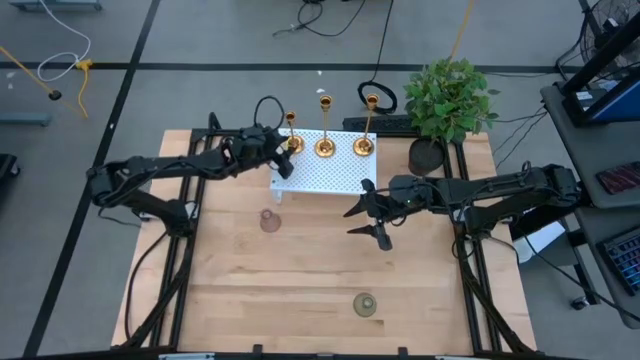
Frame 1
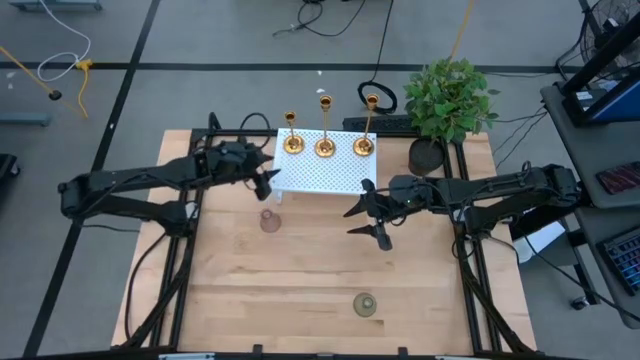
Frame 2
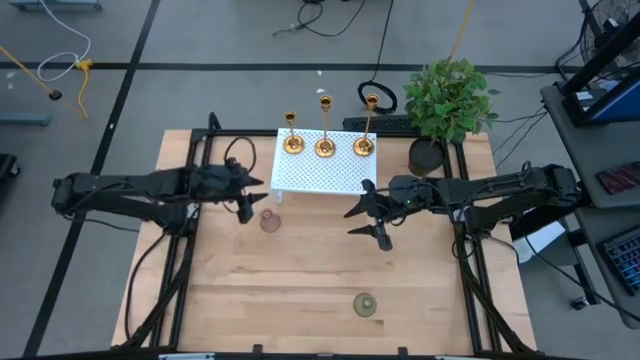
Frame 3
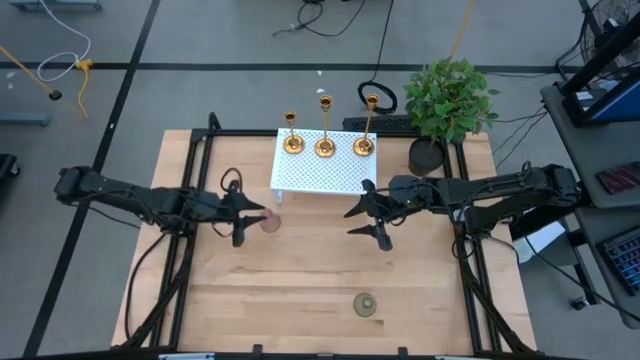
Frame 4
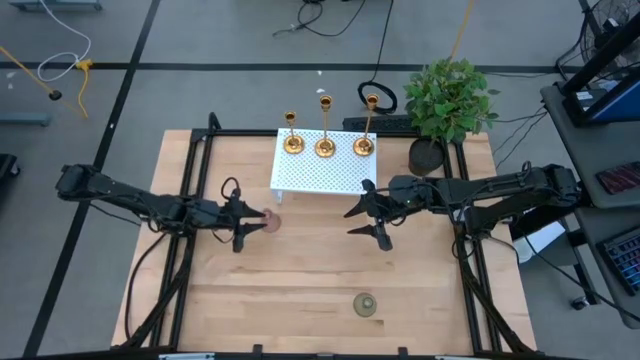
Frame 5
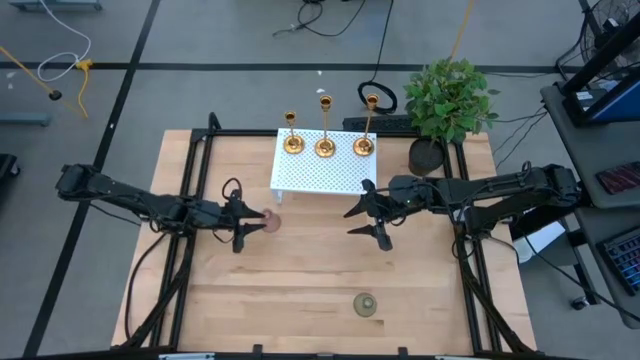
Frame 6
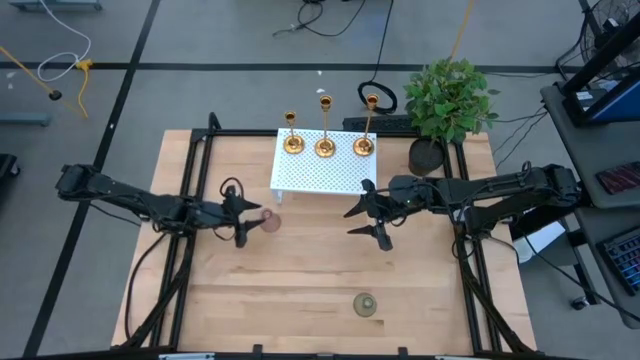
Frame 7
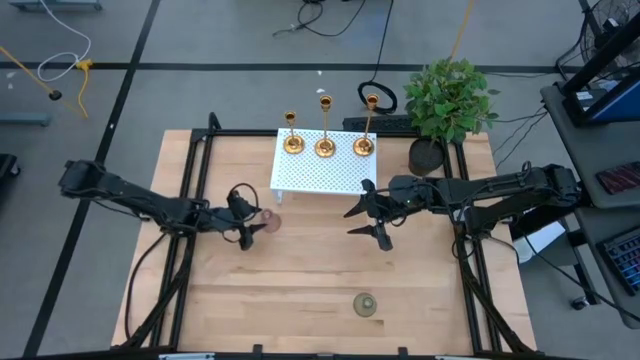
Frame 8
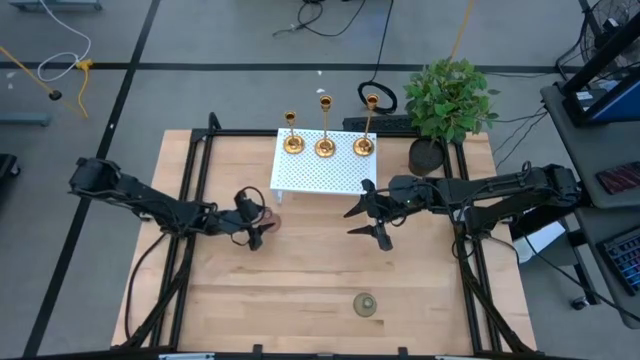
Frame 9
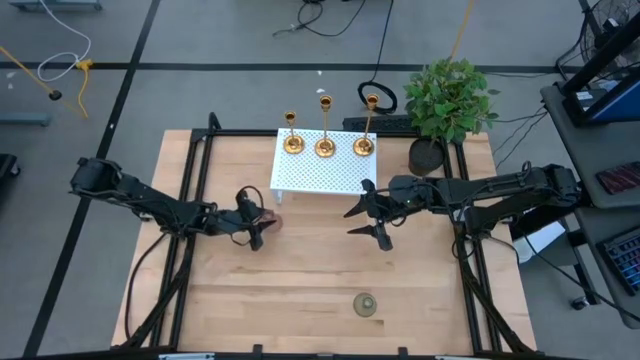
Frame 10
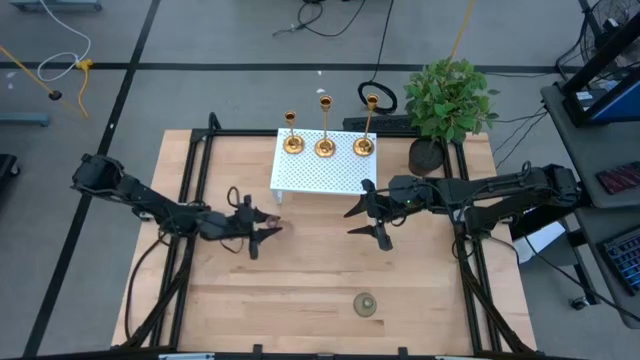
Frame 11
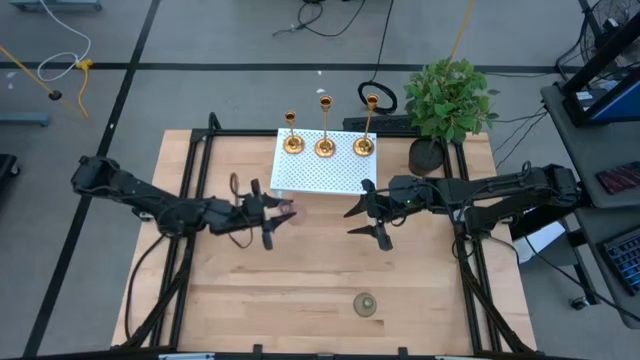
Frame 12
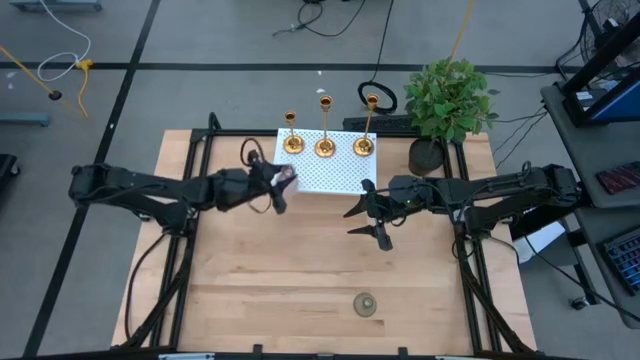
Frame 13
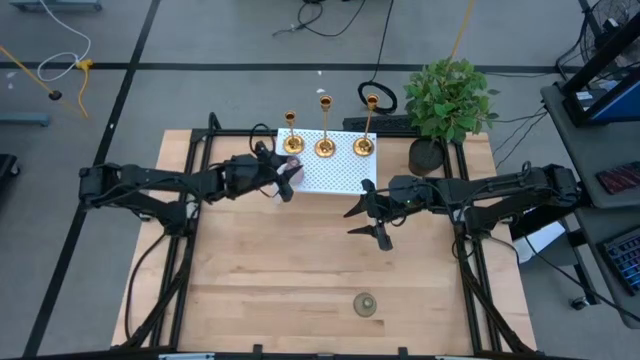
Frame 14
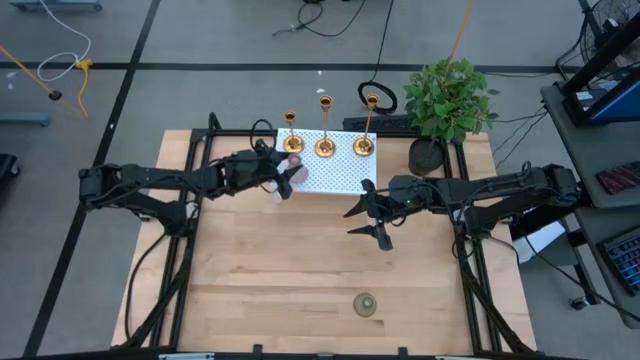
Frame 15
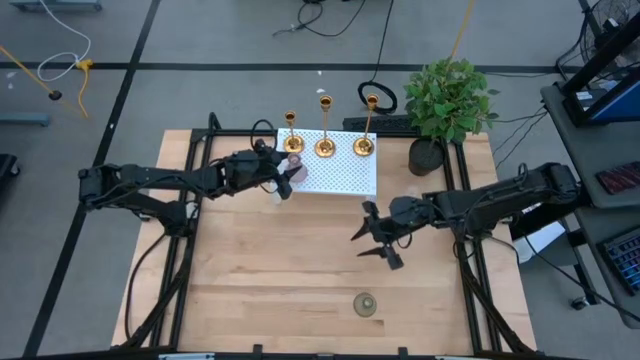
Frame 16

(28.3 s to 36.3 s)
Task: Pick & Place candle stick holders
Put the pink candle holder on the shelf

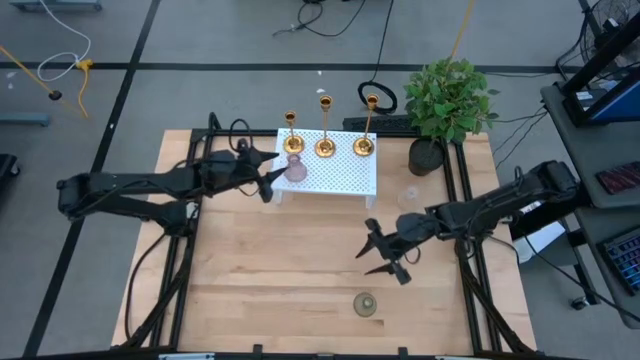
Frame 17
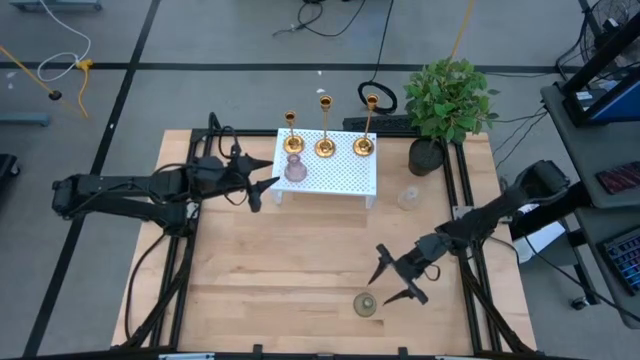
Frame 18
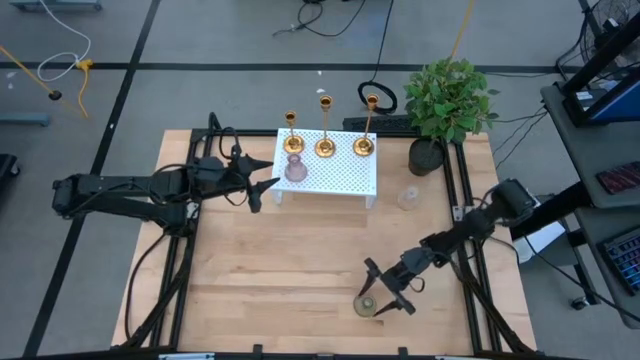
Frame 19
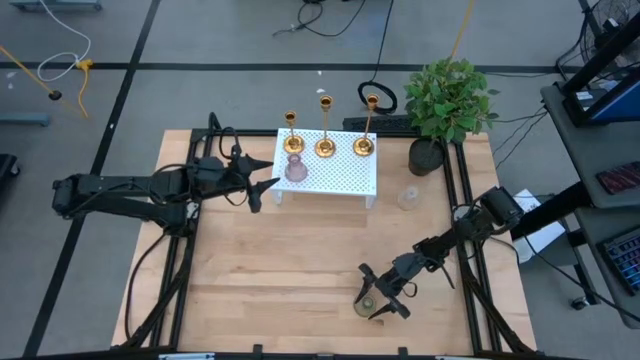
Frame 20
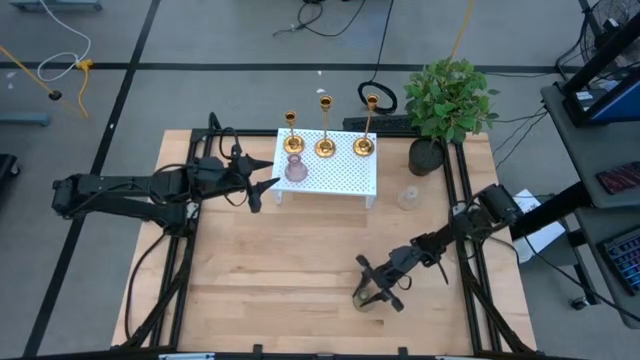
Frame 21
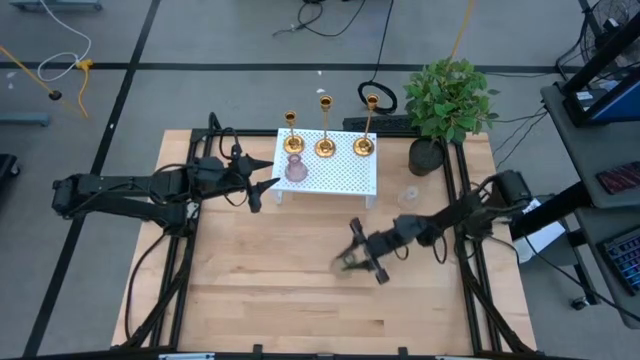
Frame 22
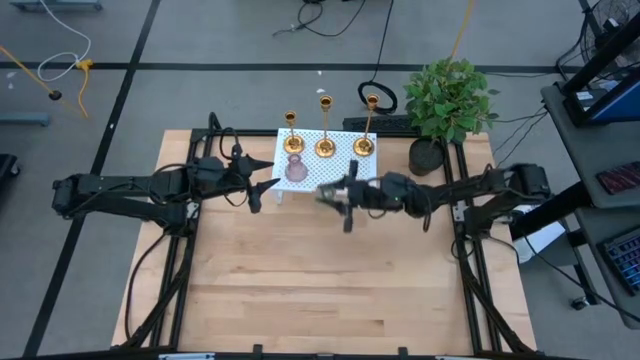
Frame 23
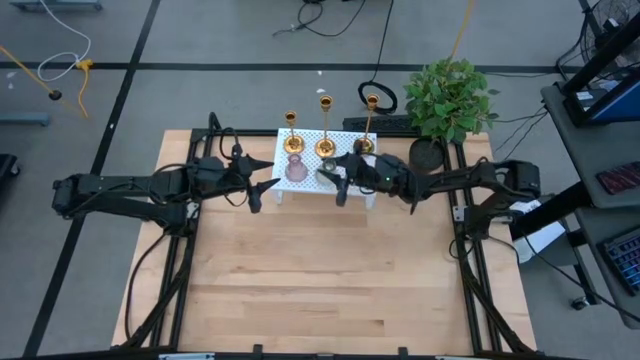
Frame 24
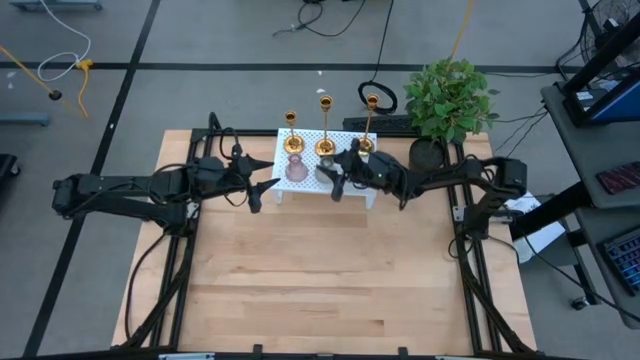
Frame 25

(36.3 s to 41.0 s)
Put the green candle holder on the shelf

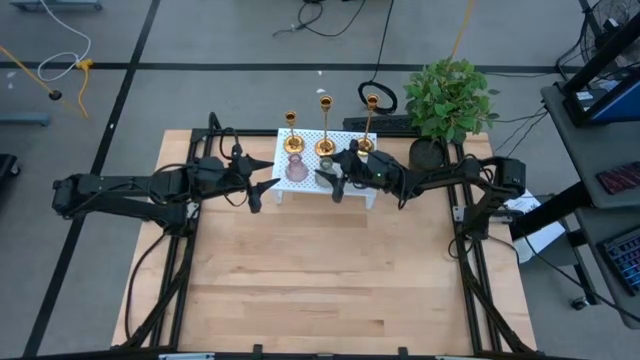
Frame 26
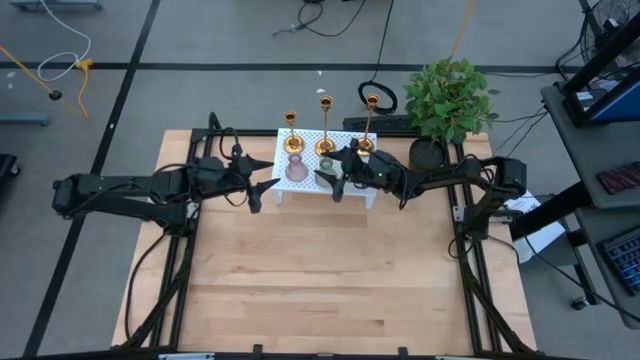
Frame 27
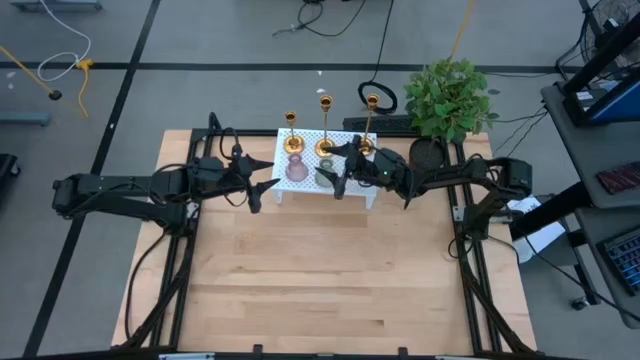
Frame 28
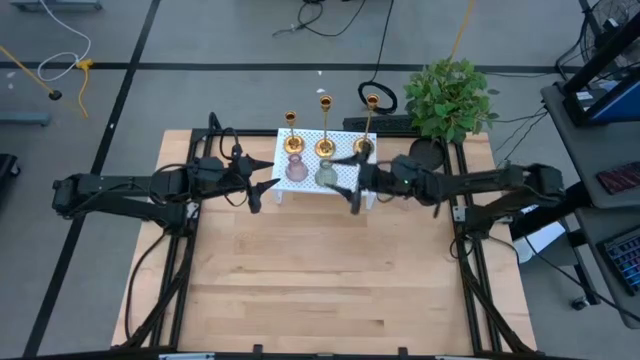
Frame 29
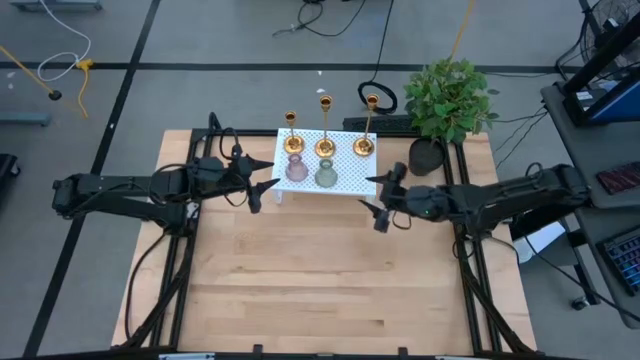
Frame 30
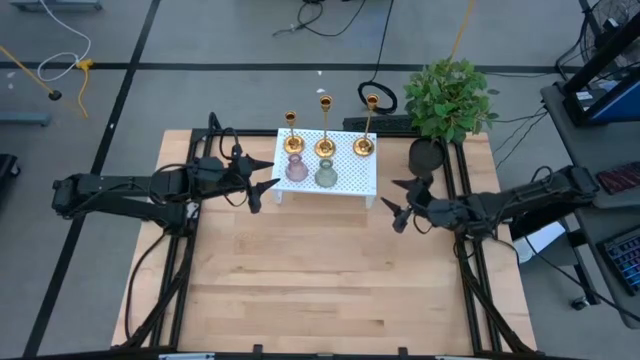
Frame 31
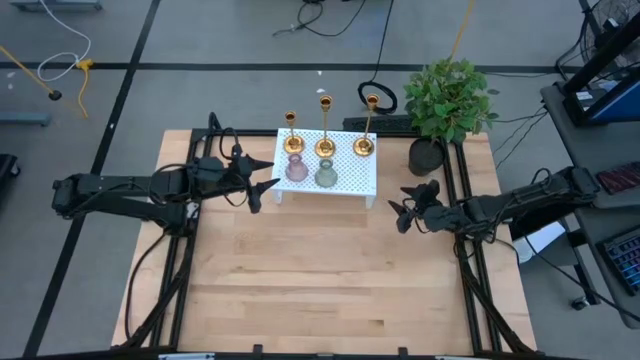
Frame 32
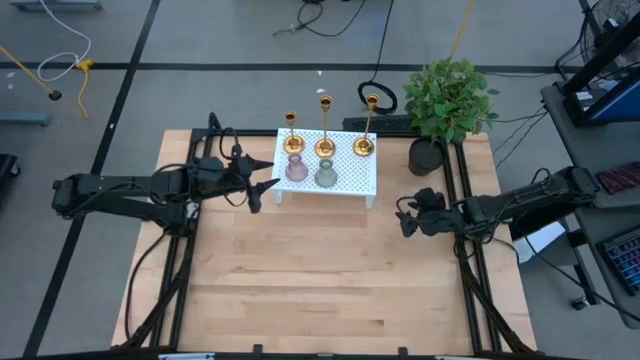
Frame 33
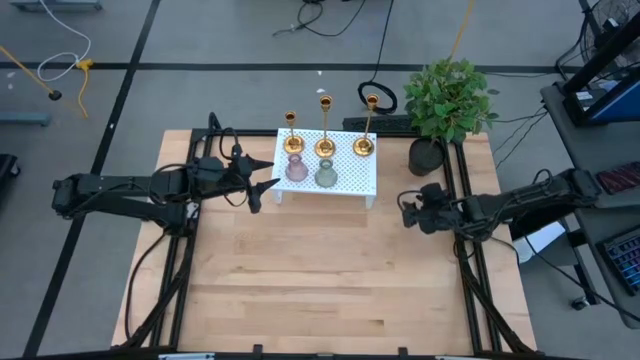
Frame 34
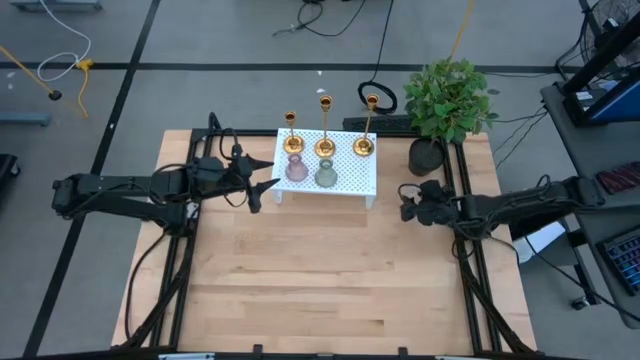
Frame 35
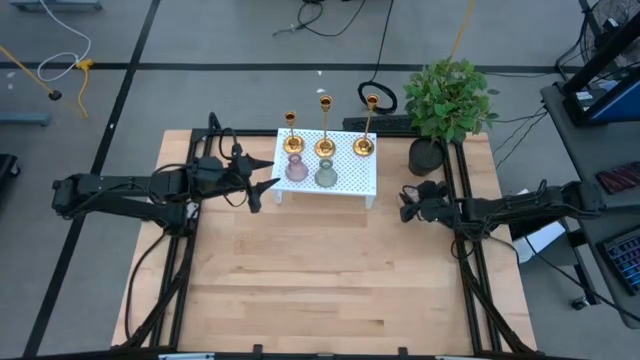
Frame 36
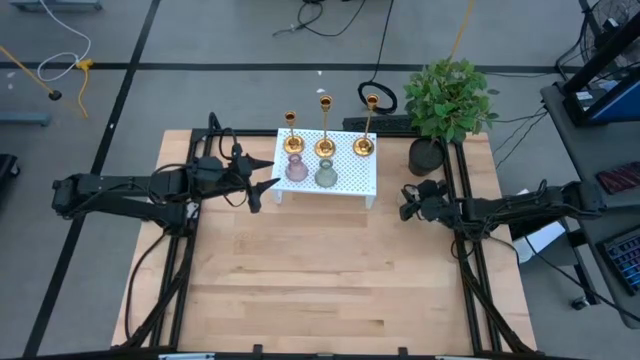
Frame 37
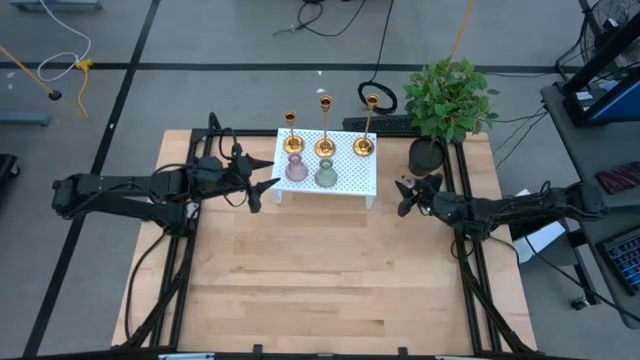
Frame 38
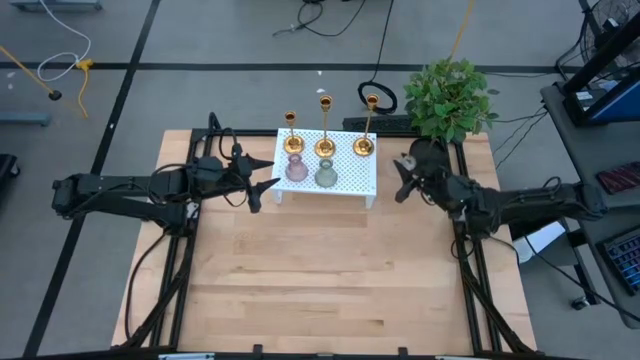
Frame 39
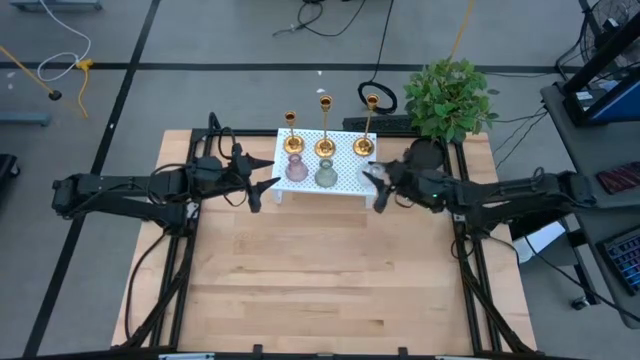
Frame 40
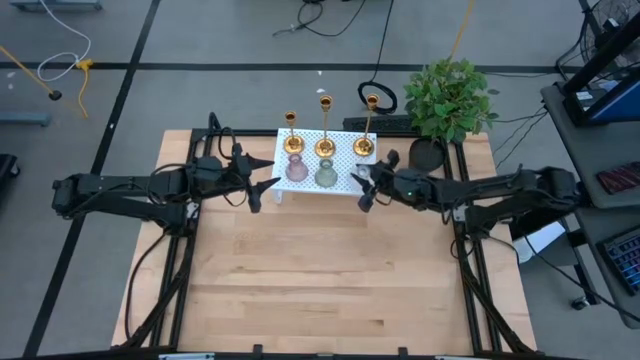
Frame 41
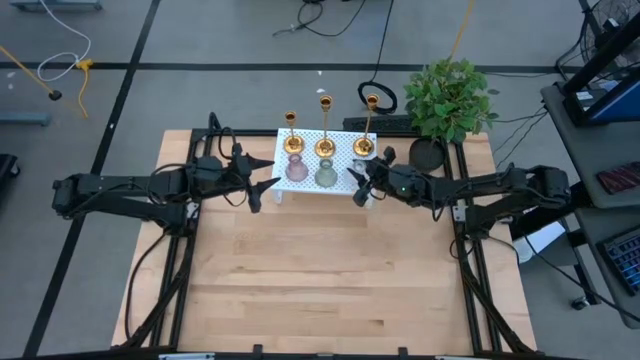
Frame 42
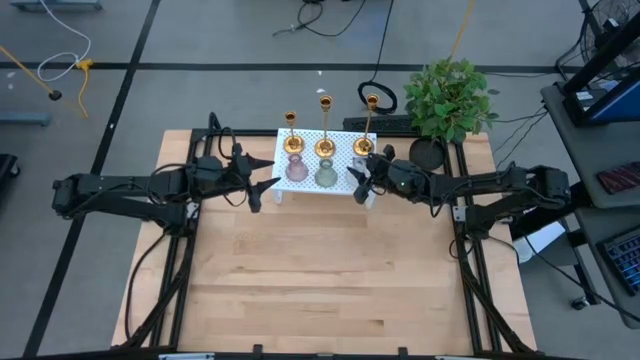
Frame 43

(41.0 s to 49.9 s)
Put the transparent candle holder on the shelf
